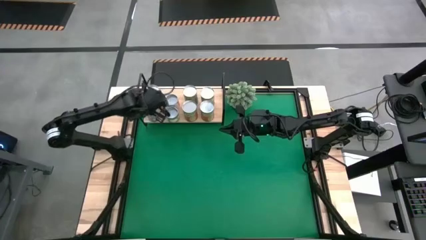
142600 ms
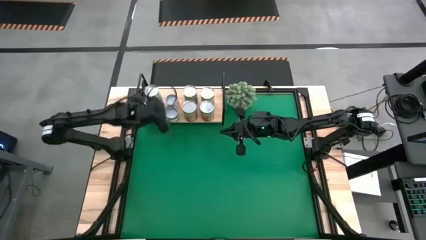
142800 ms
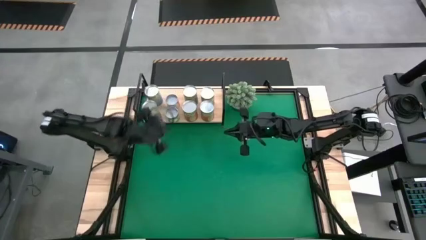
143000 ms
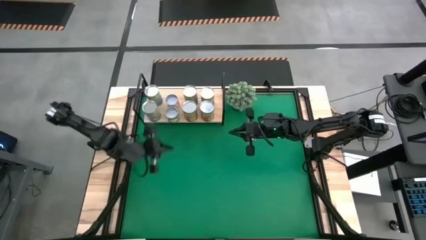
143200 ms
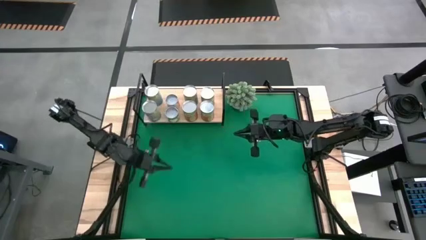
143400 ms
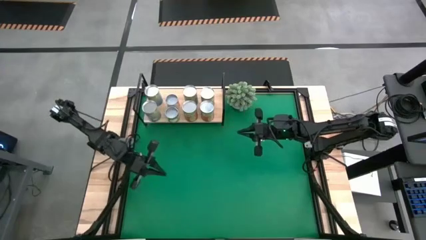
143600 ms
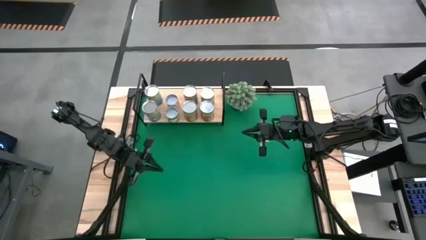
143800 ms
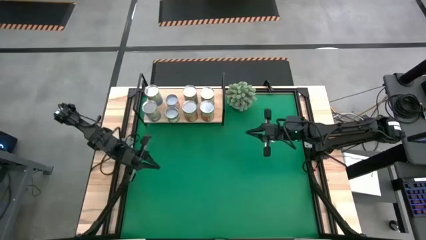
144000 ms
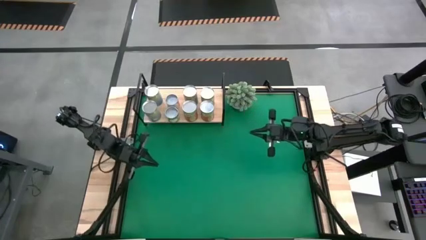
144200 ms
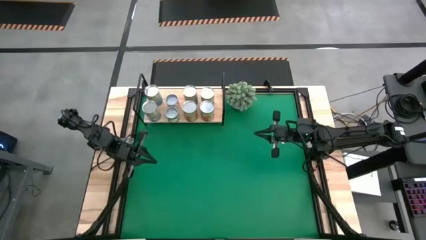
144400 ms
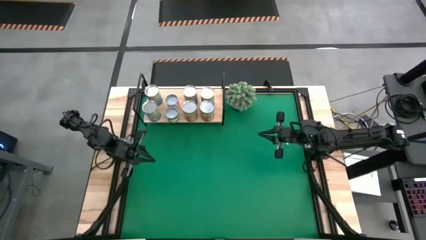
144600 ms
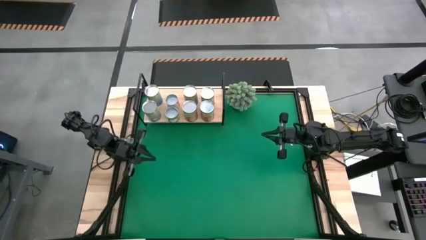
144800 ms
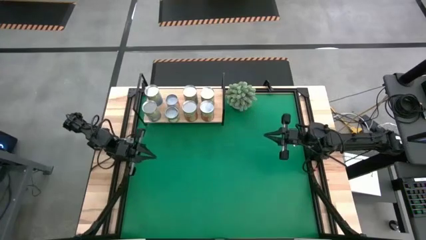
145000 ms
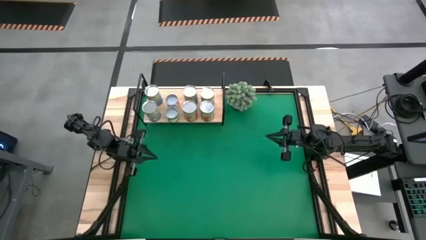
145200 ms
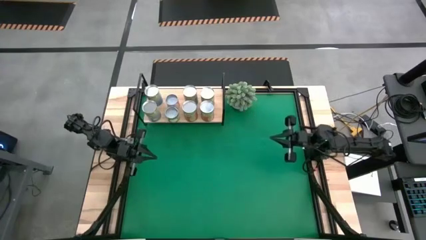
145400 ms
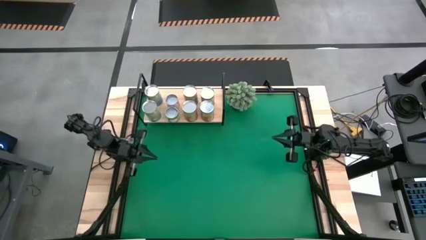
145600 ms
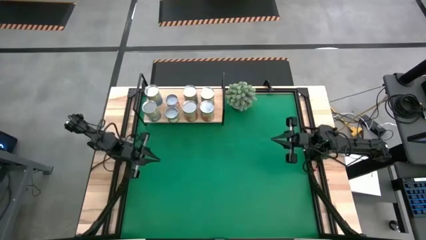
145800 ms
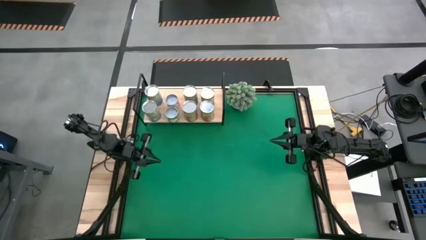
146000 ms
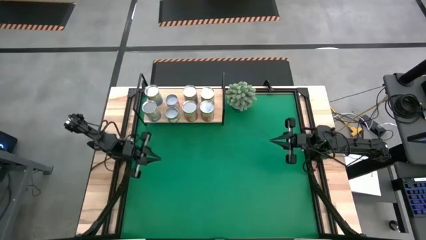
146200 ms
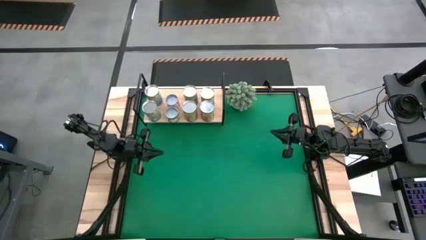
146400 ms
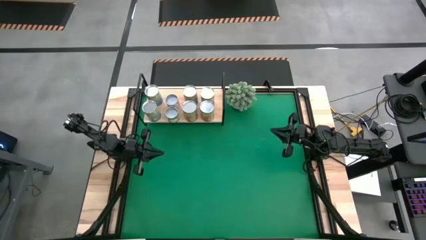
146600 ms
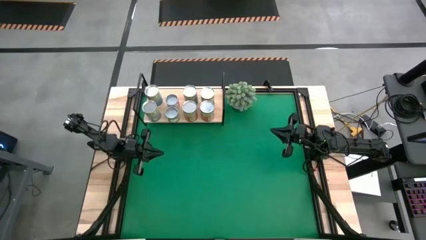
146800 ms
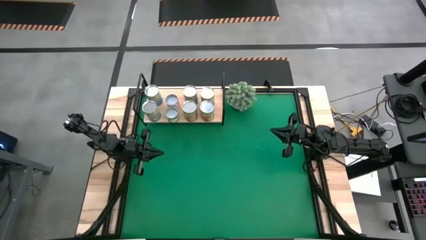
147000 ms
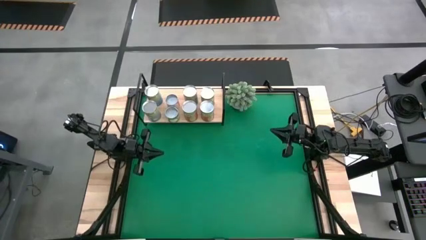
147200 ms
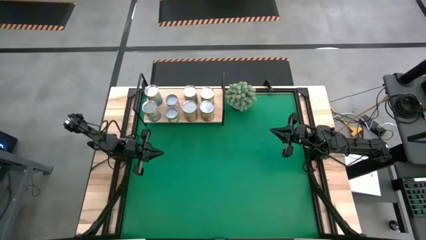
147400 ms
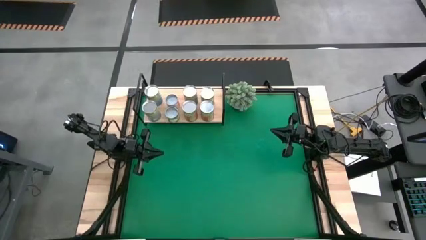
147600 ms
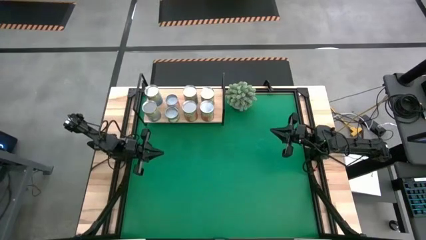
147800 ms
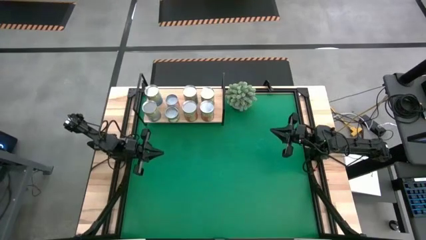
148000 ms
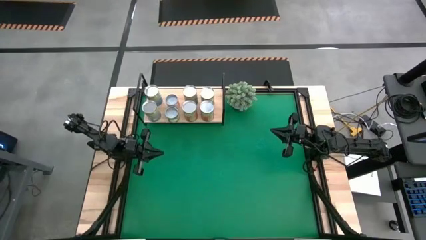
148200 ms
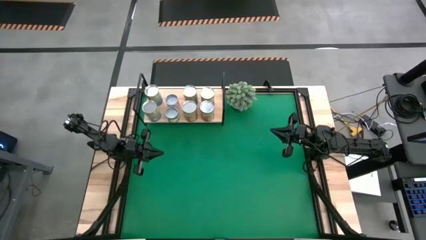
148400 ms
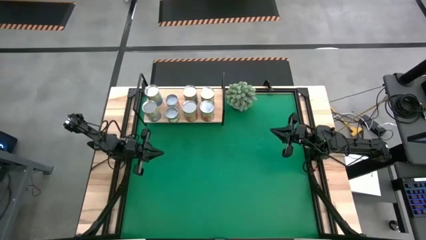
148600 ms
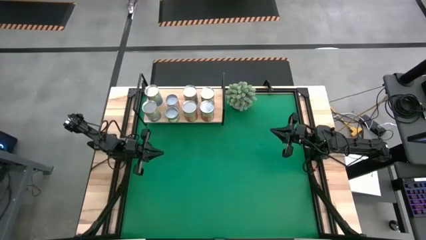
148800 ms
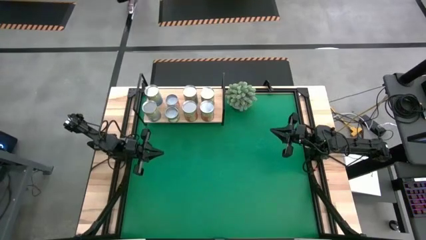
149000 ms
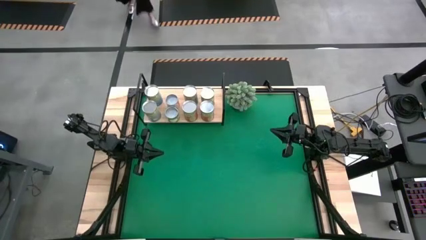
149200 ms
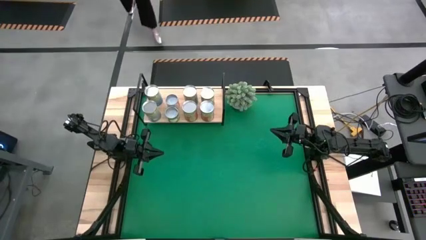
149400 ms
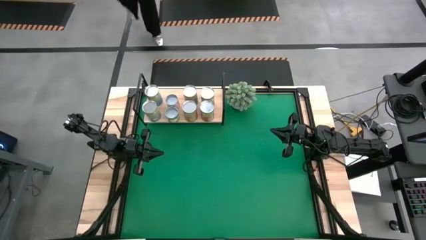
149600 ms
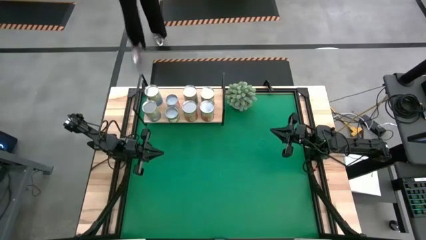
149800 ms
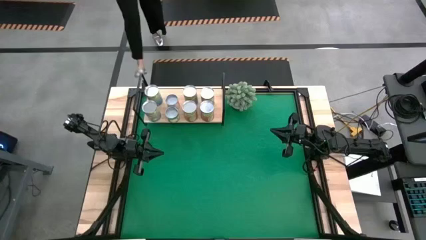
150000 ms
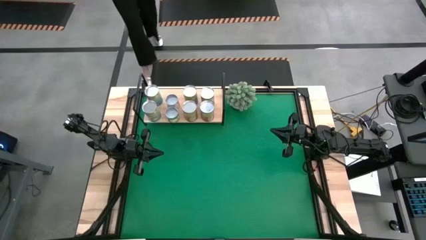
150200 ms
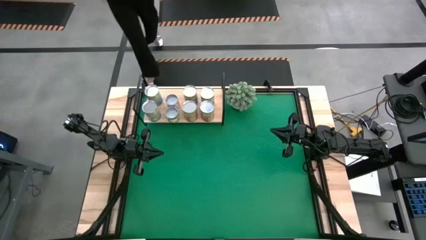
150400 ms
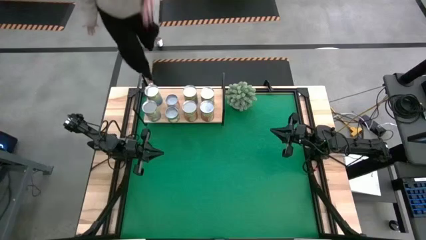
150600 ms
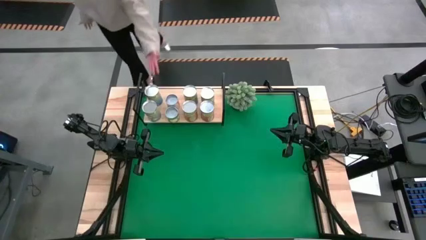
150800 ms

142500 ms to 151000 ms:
Task: Pick and place cans onto a shelf
Return to Home Position

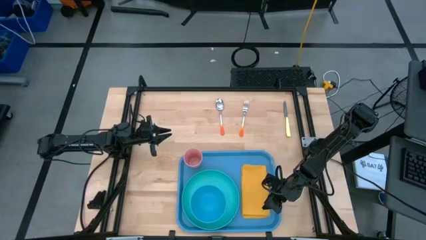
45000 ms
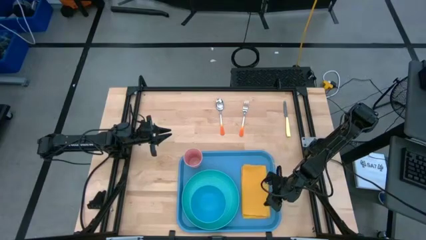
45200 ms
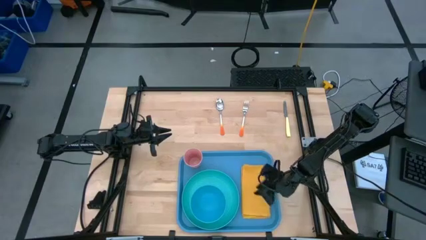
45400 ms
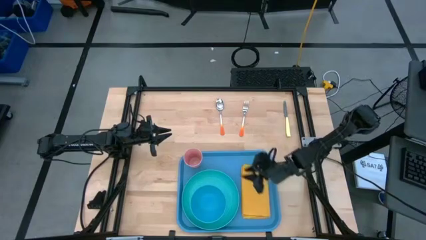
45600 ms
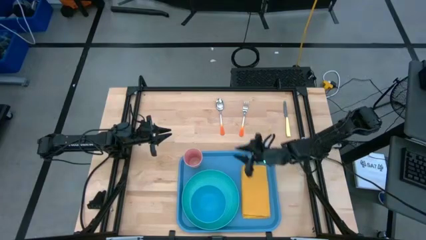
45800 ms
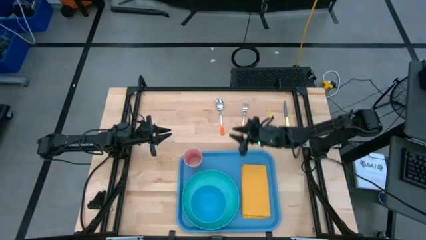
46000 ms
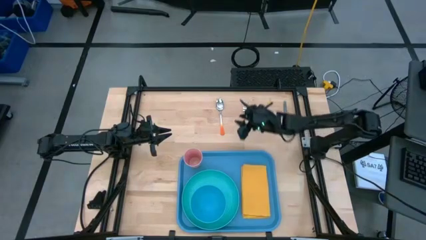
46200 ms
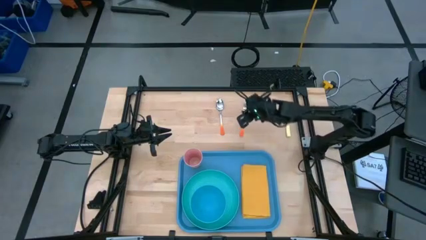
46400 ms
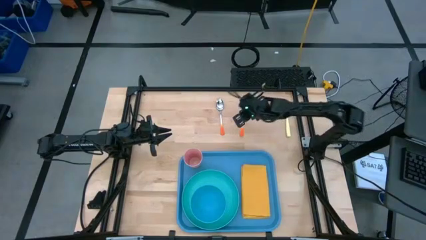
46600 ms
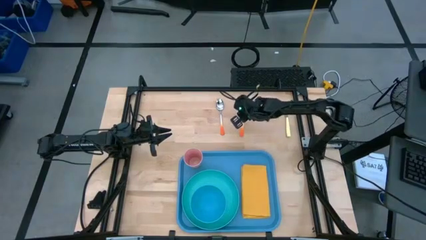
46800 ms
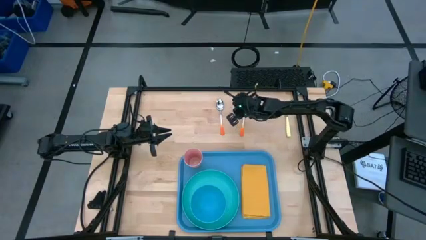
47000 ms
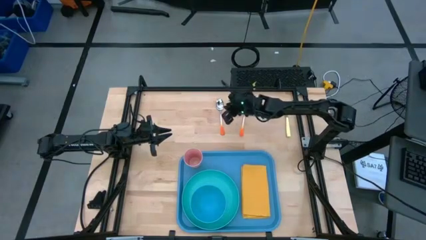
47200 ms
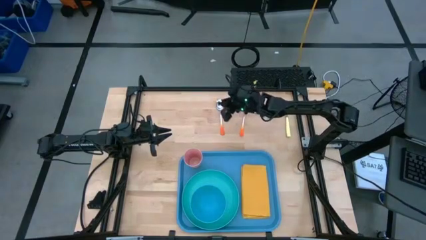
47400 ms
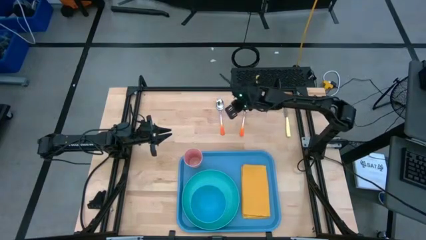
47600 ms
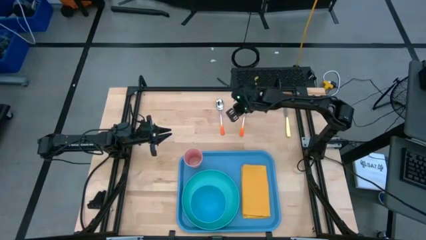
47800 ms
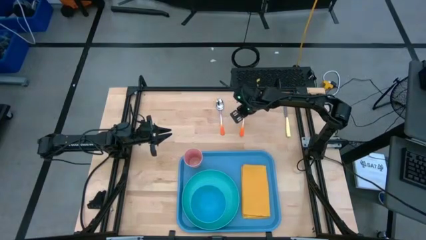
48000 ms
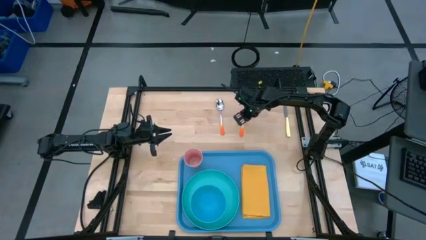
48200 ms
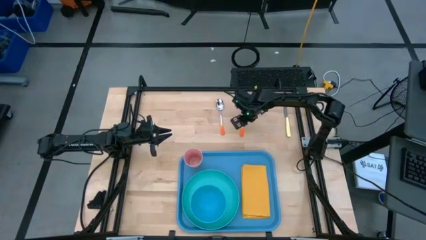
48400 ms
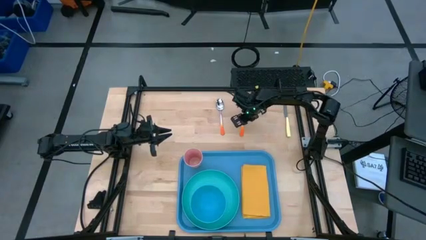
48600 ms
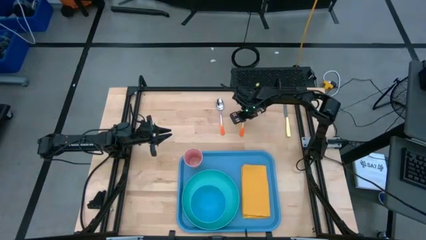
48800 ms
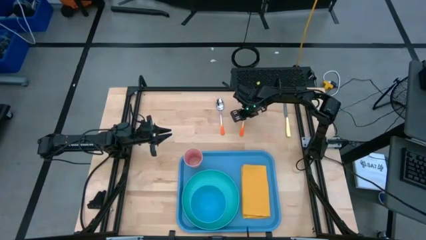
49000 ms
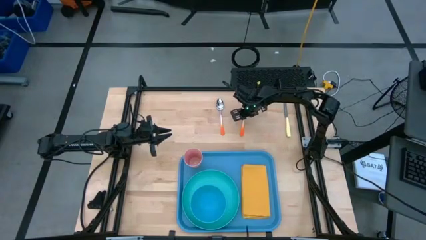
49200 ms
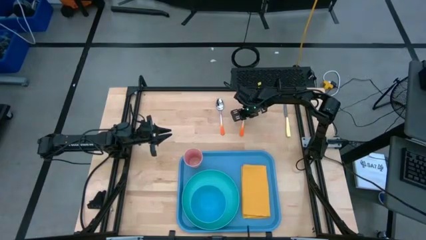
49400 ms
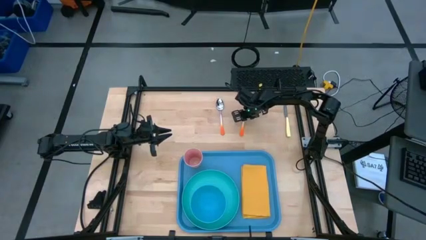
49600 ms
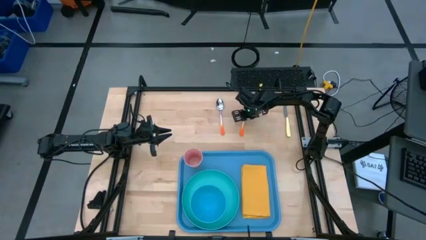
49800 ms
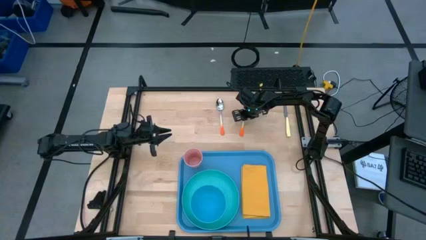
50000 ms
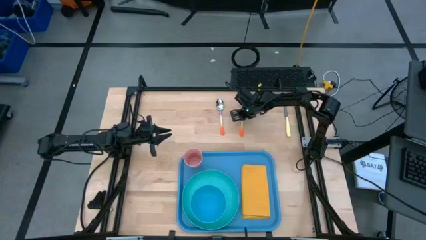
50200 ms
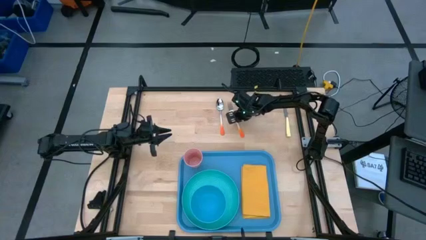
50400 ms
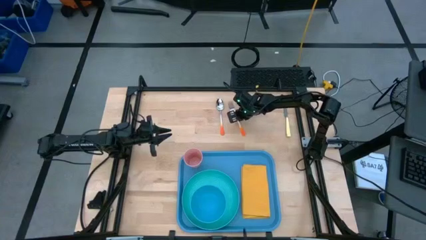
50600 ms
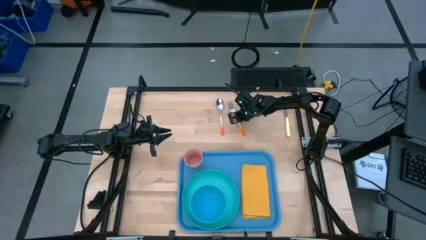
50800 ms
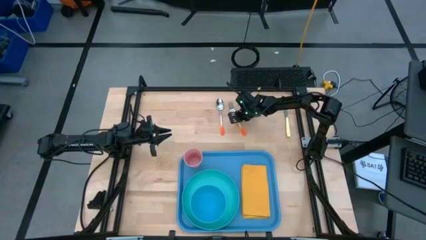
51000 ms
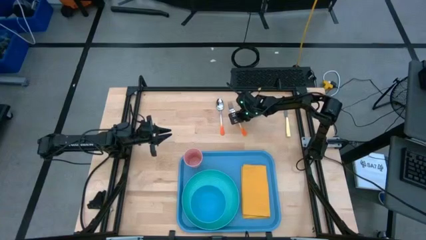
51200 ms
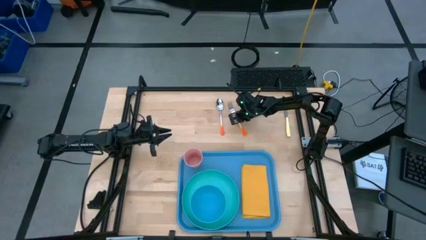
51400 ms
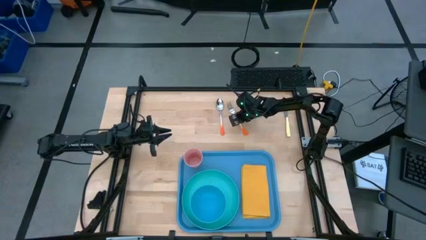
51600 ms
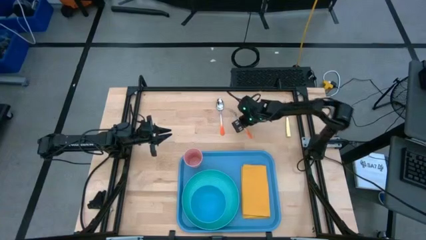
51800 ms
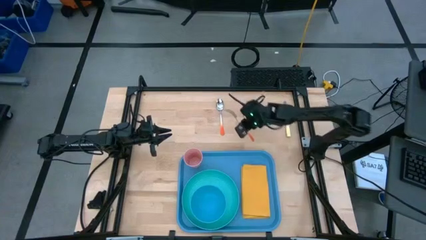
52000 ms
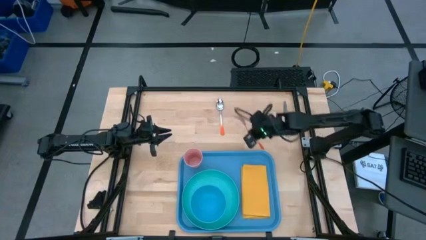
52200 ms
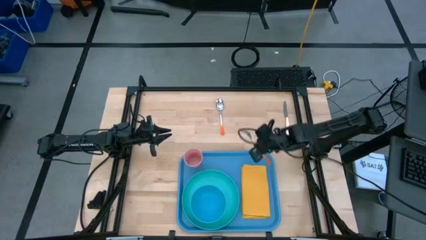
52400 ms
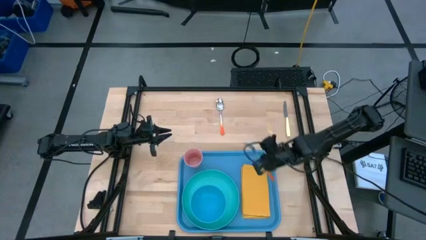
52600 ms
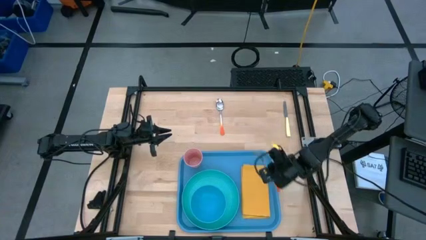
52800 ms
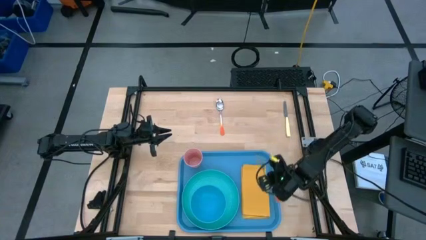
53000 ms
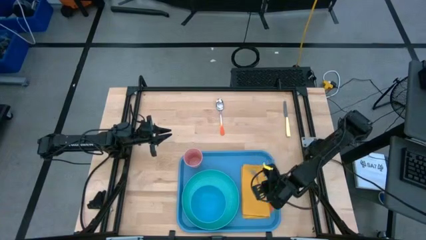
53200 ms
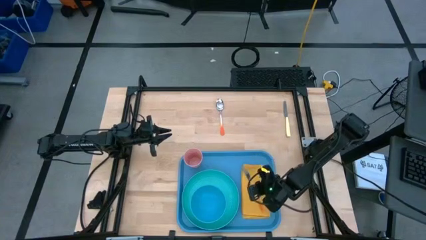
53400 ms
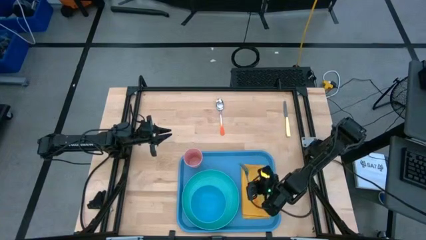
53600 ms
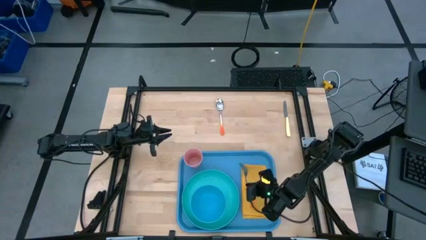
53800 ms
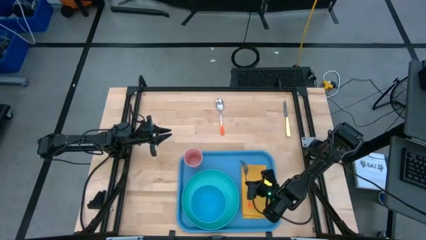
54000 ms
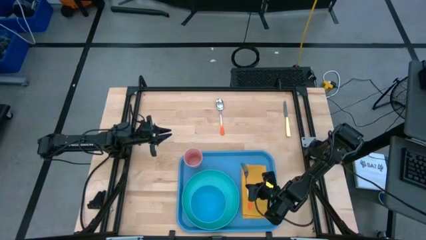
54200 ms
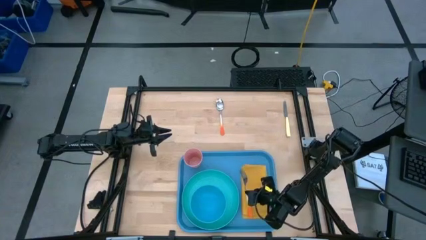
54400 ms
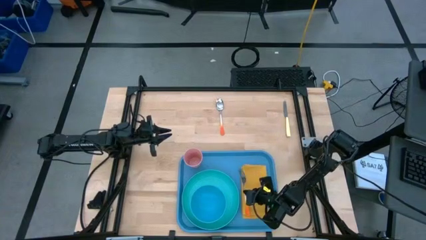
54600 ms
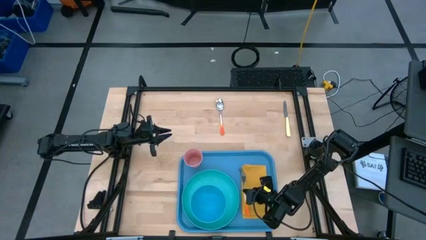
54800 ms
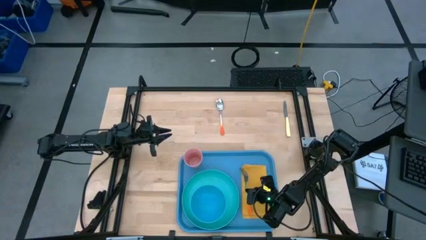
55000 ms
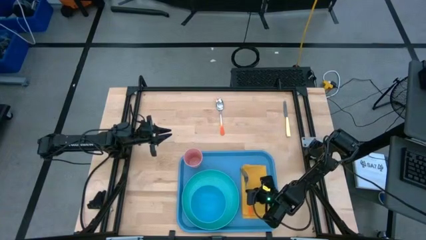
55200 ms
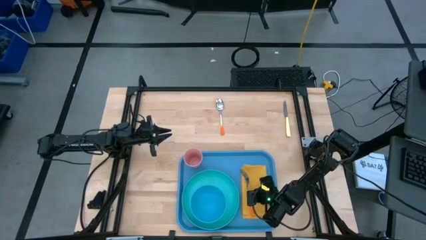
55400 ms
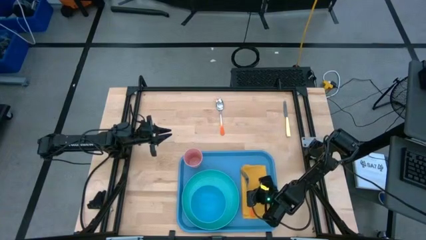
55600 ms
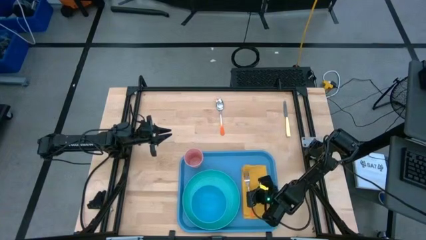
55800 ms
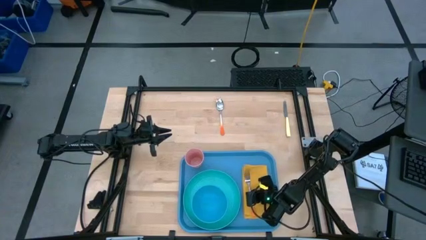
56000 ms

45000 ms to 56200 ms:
Task: Set up tray
Put the orange fork on top of the yellow napkin
